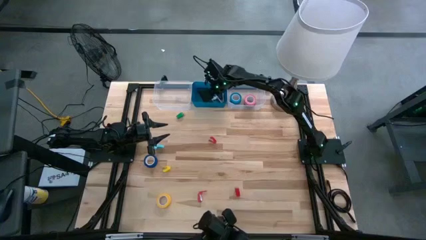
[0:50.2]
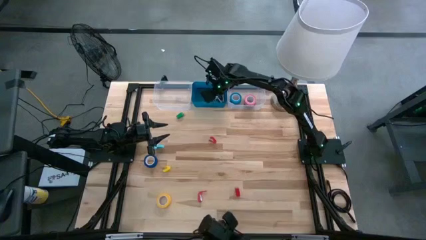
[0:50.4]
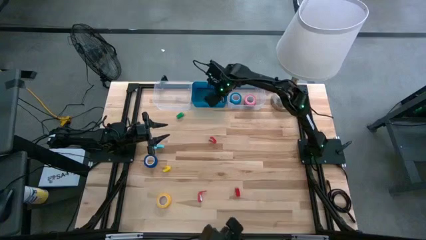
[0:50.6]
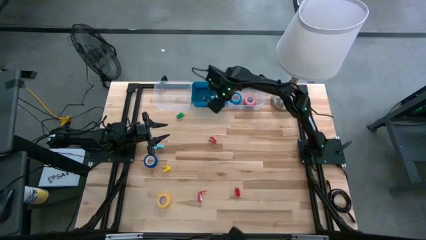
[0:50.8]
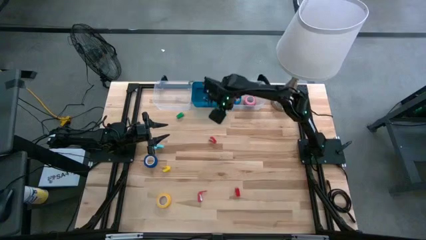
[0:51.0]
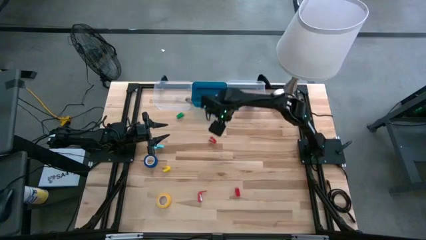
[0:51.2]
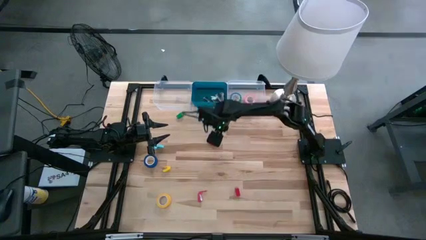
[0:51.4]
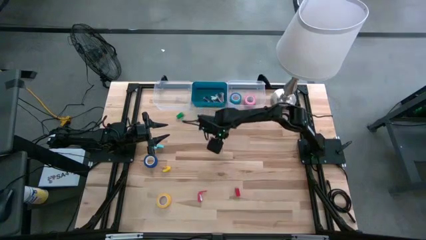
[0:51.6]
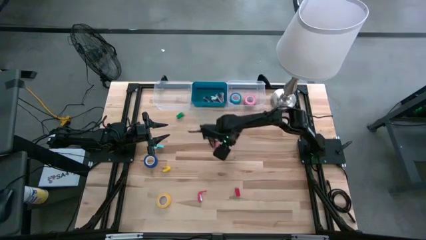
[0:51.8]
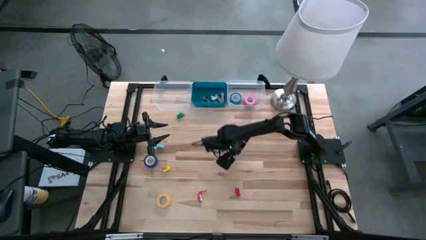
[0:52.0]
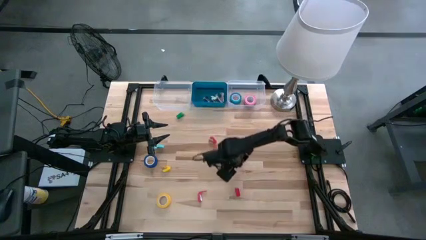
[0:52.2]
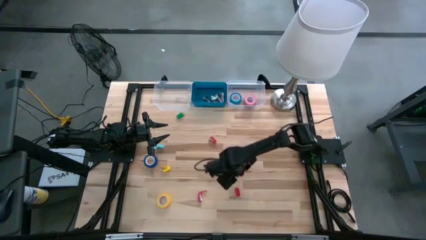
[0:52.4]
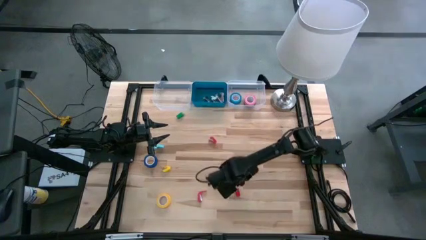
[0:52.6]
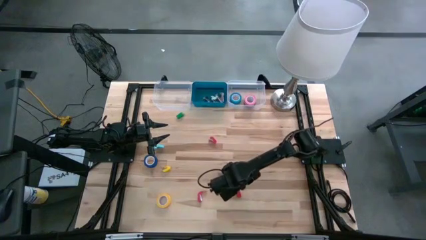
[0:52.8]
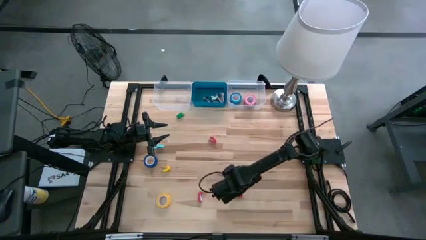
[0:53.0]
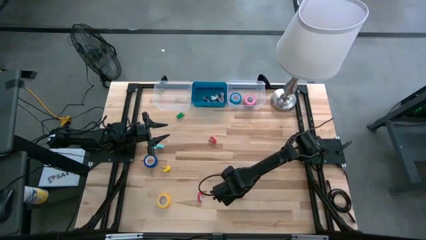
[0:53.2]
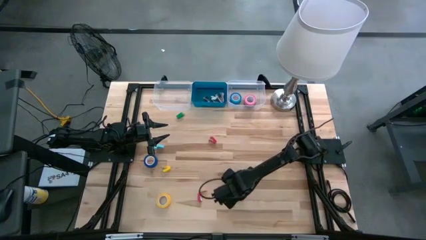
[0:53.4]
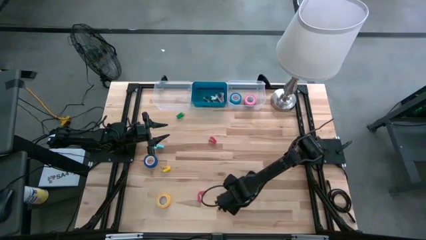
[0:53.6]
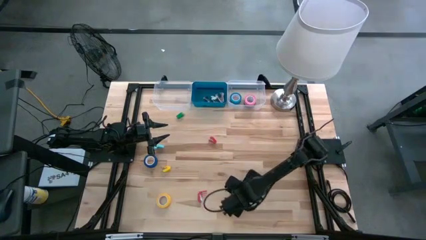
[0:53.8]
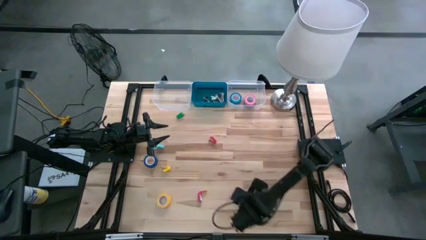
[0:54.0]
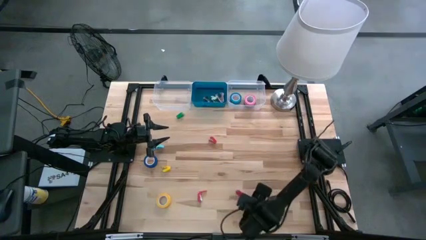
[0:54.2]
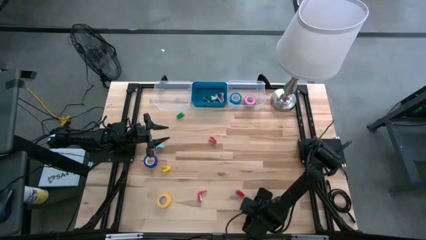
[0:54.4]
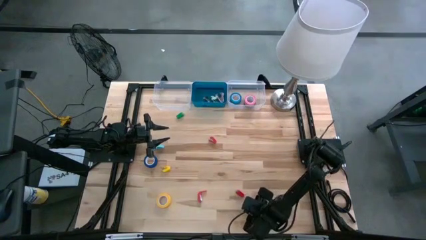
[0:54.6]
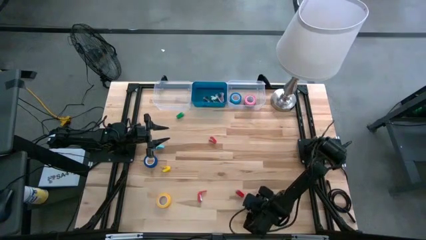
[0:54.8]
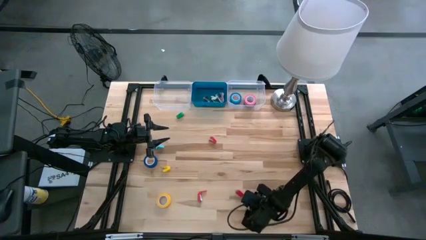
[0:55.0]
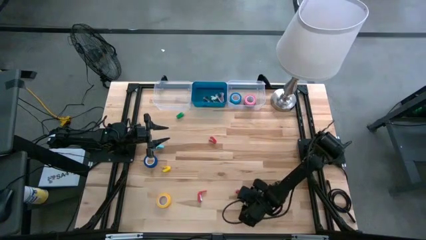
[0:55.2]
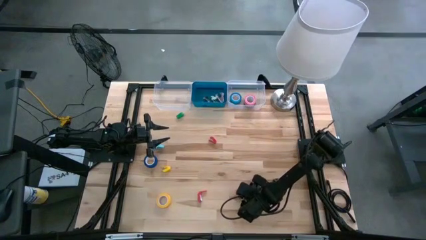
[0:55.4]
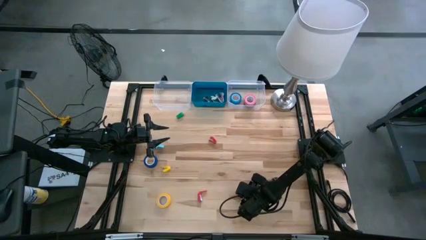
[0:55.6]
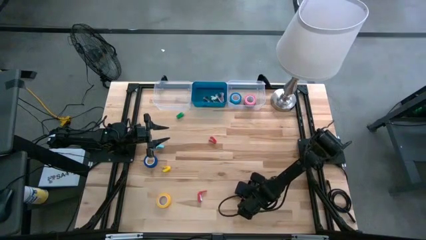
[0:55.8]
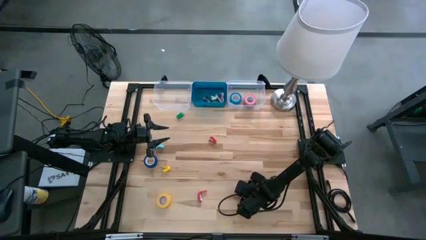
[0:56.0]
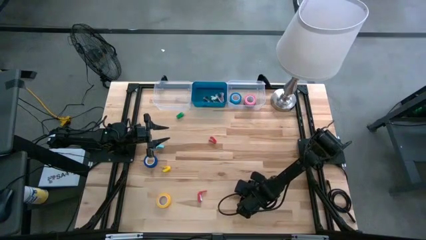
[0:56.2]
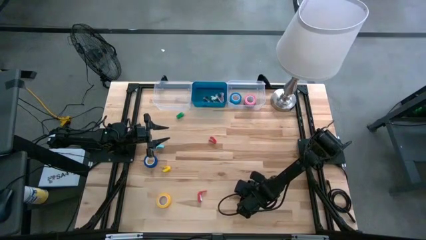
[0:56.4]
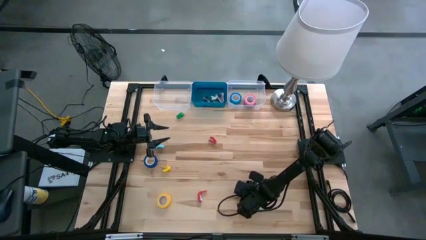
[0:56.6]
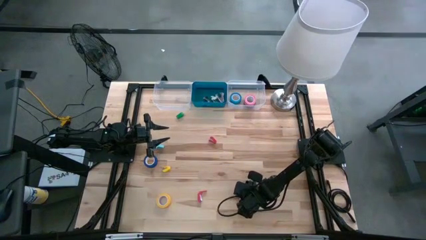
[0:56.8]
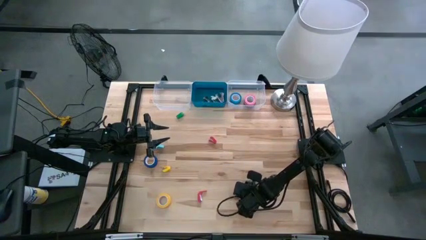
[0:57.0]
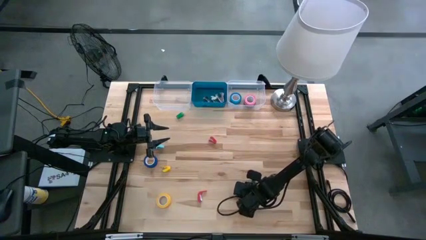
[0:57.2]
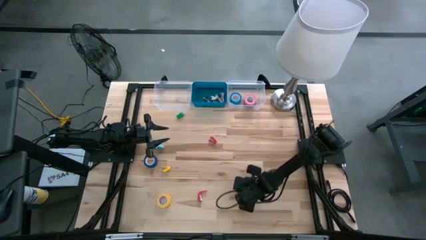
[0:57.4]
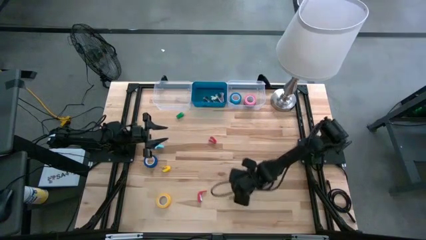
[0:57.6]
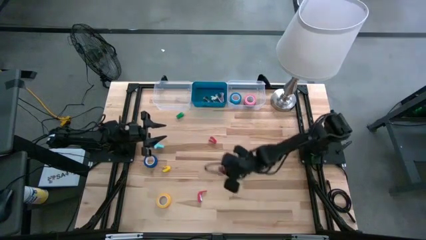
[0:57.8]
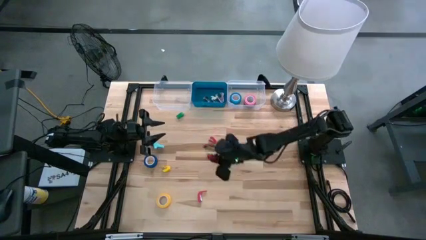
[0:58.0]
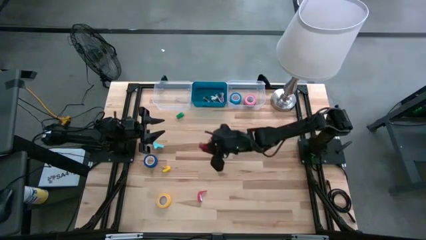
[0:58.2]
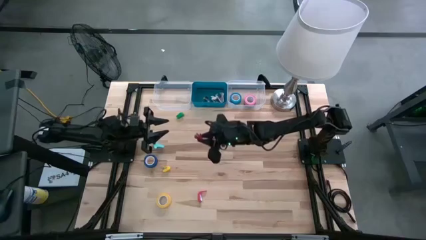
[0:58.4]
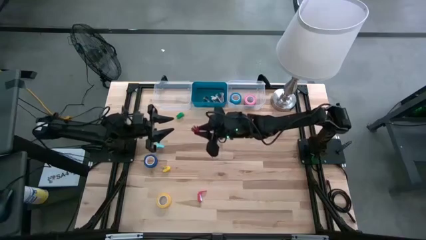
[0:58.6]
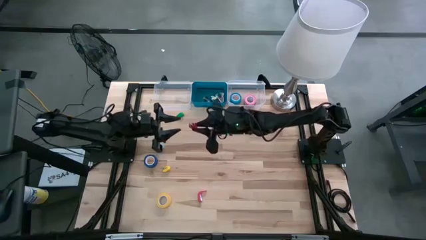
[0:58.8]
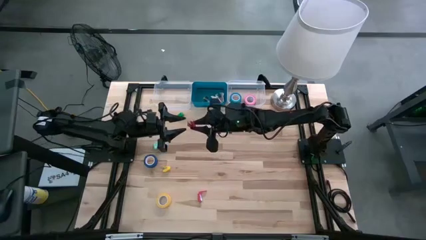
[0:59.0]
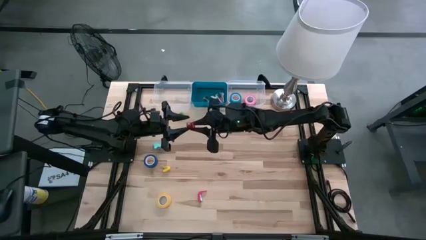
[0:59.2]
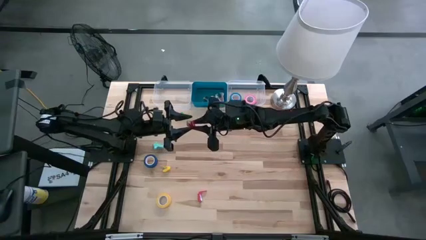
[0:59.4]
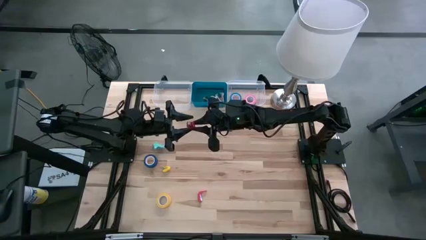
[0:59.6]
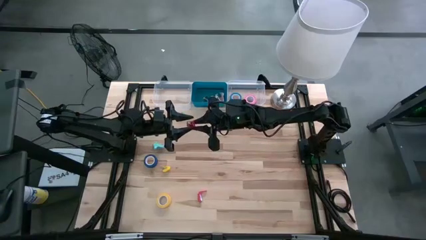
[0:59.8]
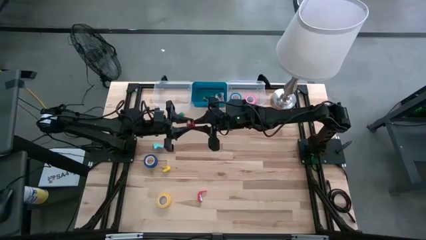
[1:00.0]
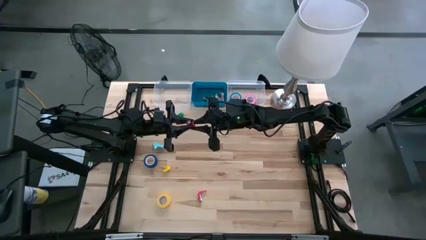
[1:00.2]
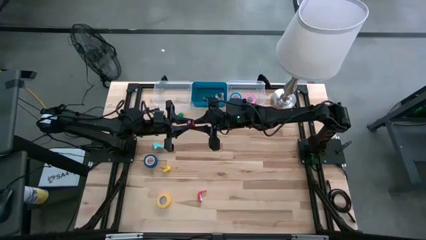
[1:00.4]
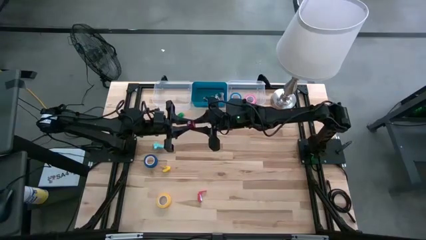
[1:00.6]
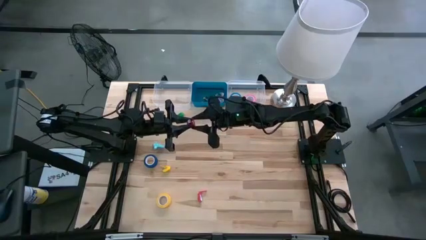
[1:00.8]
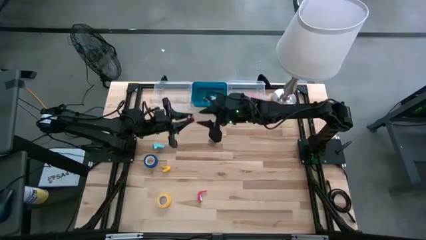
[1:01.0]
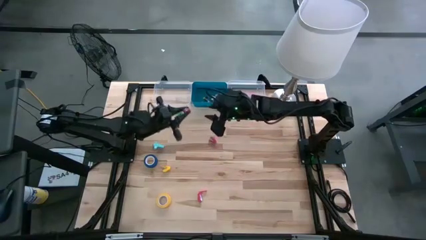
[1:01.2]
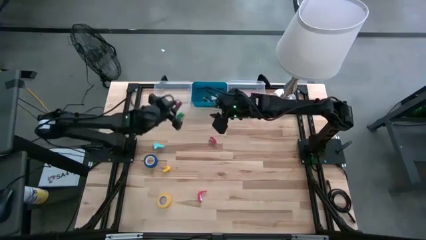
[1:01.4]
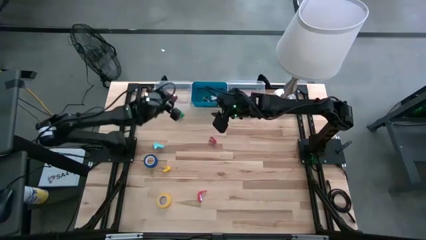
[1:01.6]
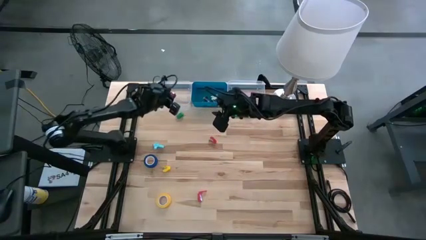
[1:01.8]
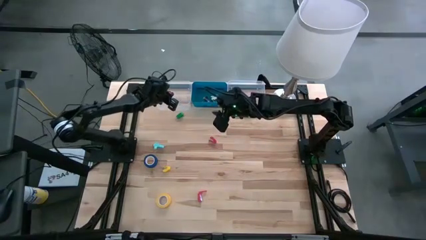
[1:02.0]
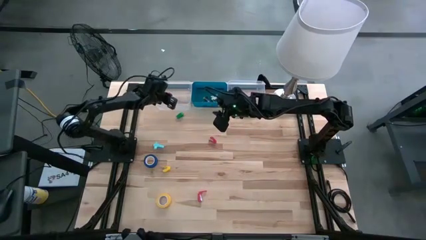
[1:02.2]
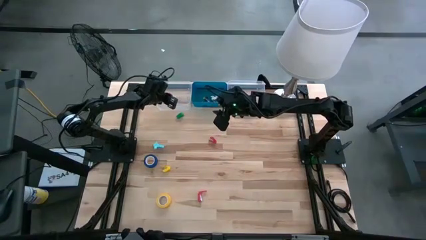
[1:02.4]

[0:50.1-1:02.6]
Task: Pick and place Stapler, Stapler remover, tape
Put the bottom right red stapler into the left transparent bin

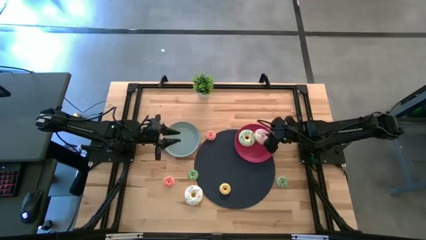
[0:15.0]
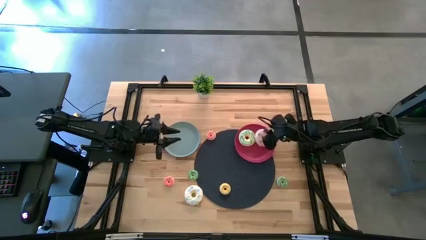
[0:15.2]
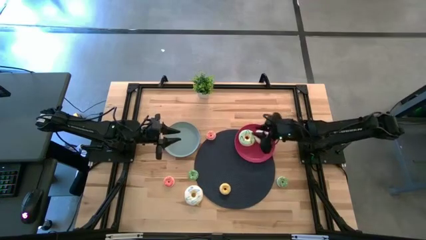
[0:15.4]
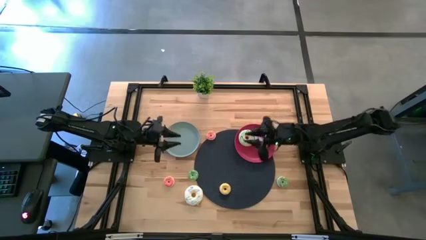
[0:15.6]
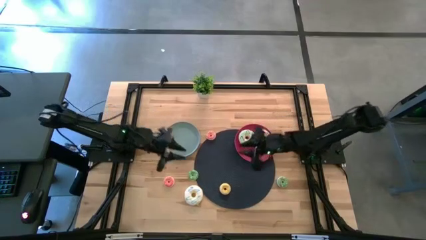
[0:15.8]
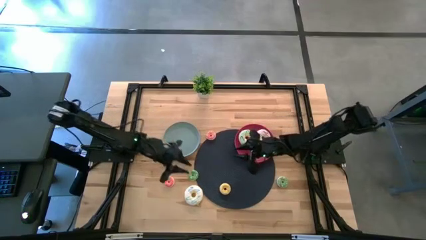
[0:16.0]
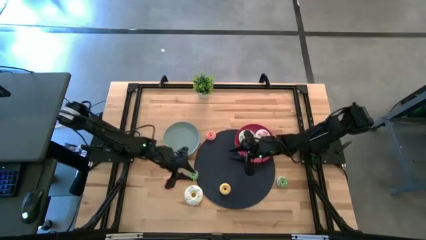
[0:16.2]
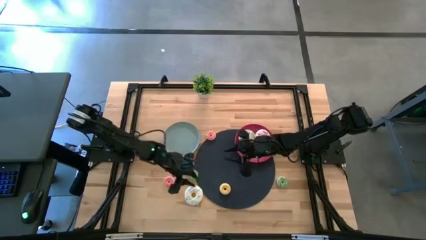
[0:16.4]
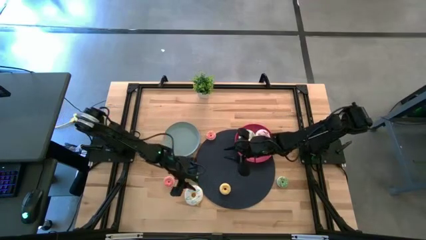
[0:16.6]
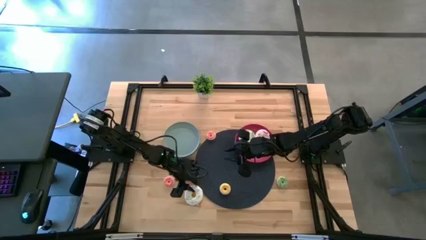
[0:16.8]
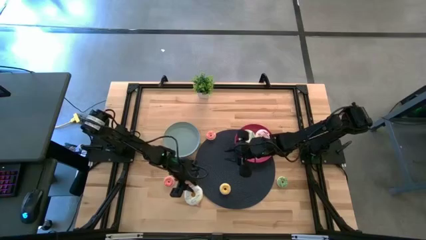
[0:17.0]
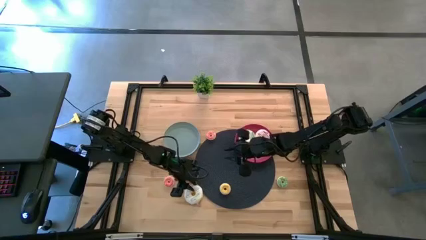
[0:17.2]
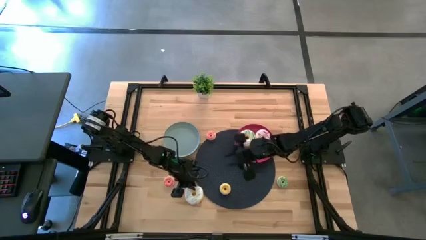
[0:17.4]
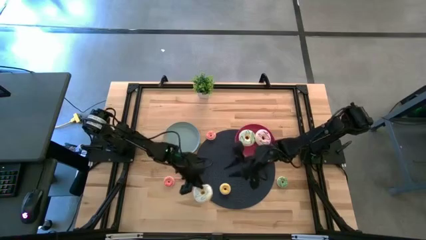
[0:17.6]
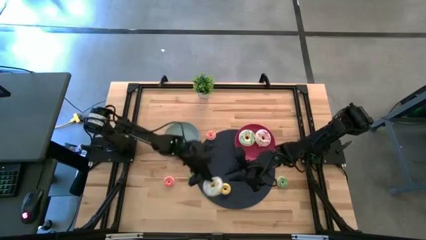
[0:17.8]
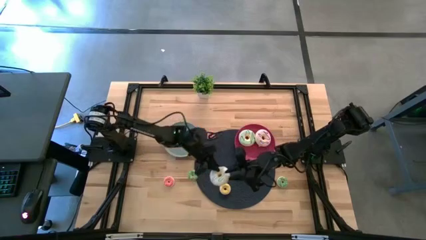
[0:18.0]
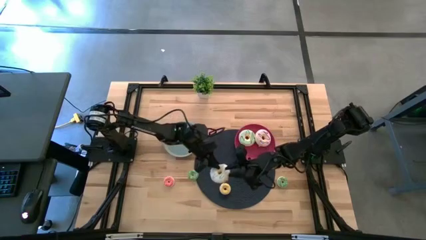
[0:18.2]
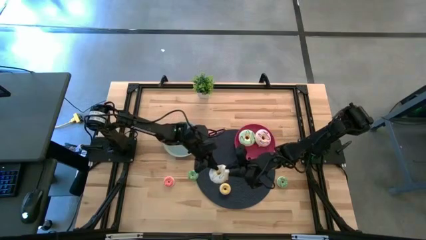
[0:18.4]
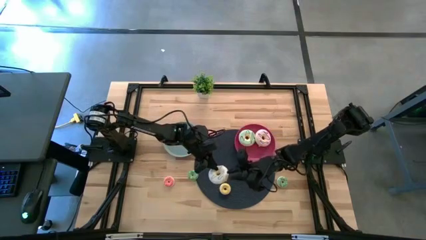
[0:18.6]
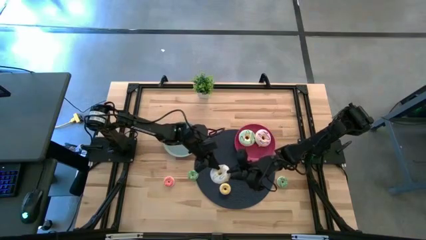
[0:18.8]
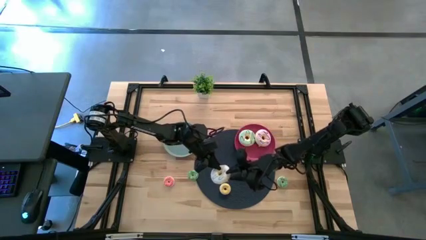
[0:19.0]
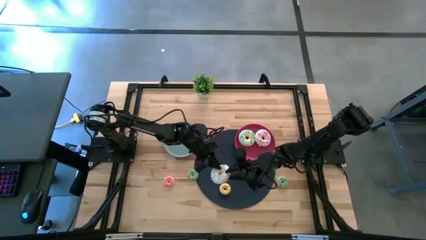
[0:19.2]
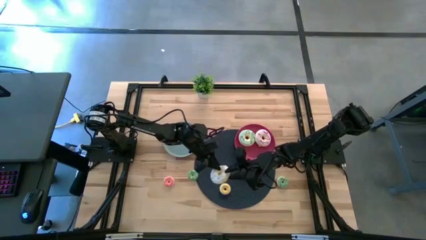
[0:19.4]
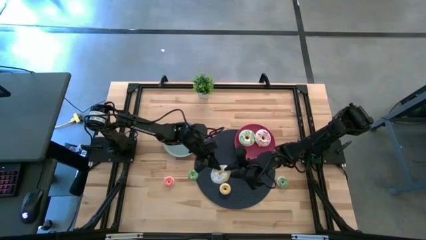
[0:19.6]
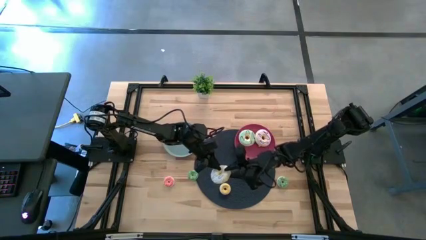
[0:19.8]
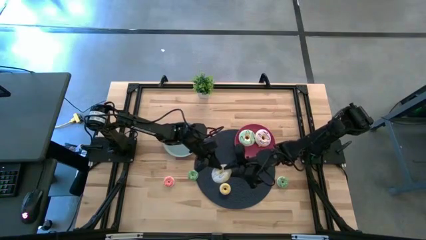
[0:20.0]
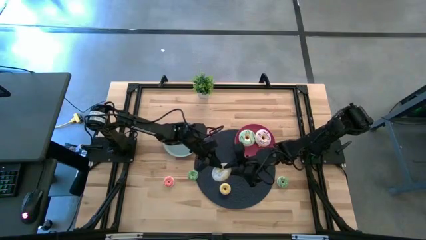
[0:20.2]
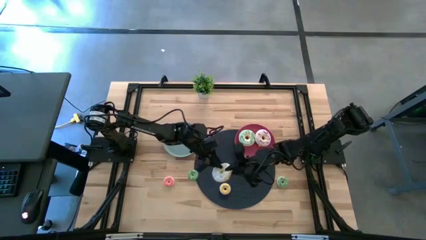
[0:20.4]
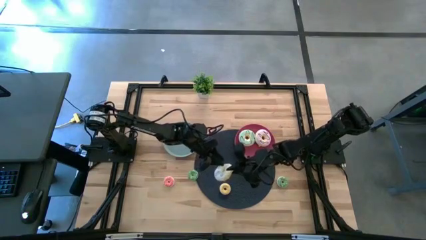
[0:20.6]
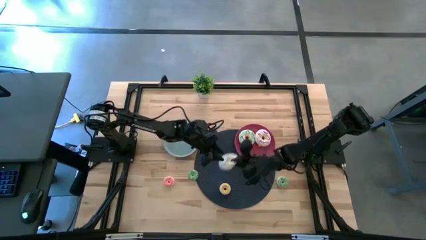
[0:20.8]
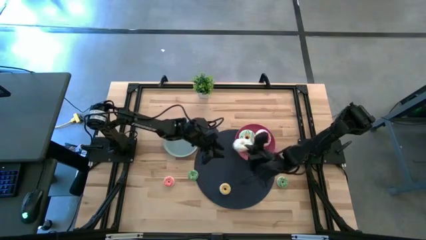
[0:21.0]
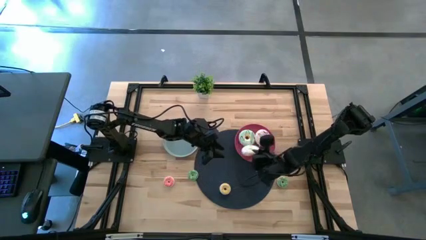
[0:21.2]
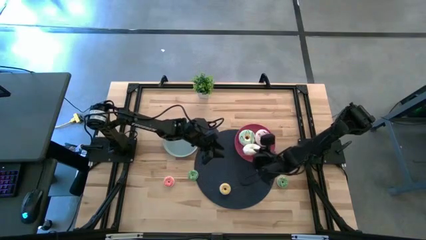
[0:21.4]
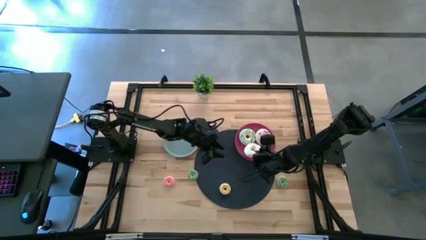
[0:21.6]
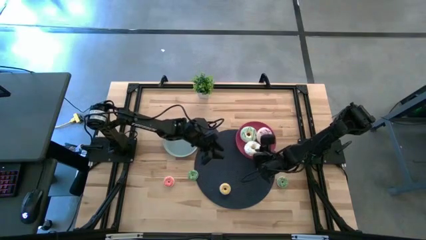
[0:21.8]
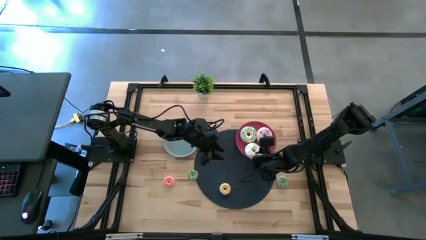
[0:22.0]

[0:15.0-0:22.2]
Task: Pick & Place donuts
Put the large white donut on the red plate
